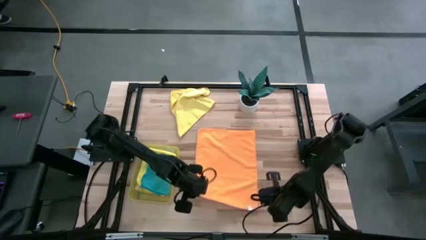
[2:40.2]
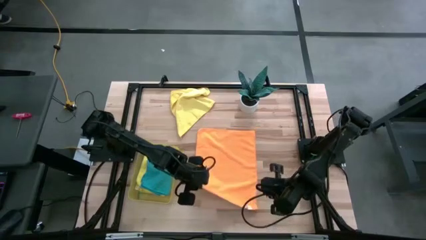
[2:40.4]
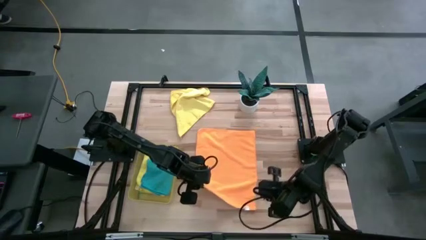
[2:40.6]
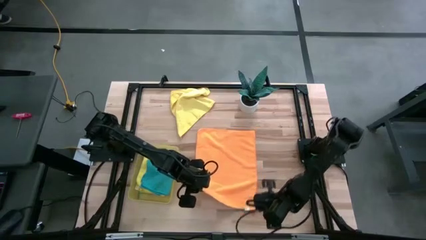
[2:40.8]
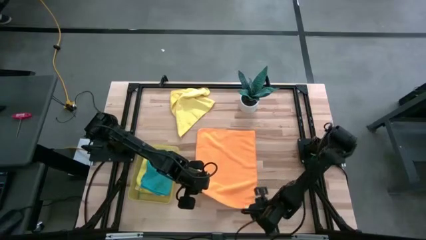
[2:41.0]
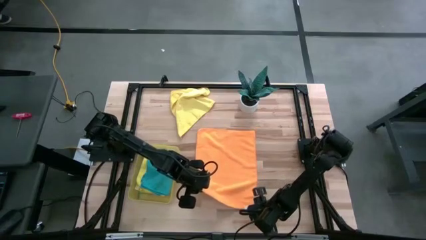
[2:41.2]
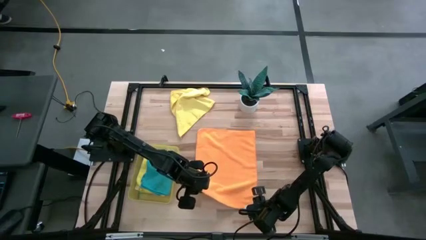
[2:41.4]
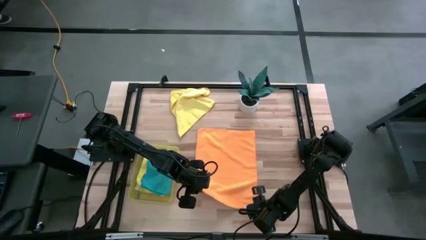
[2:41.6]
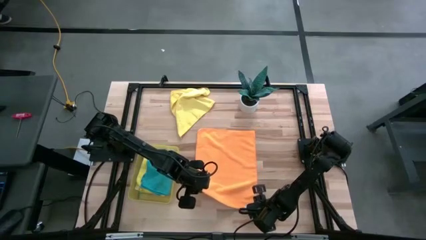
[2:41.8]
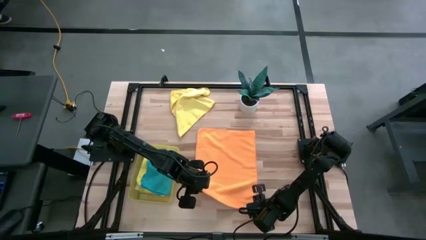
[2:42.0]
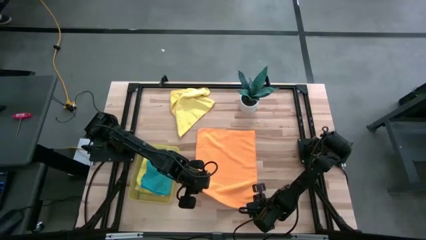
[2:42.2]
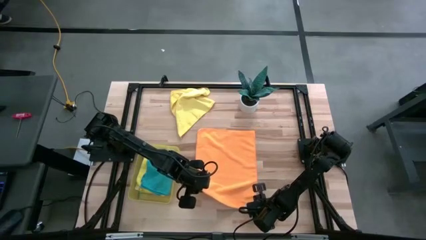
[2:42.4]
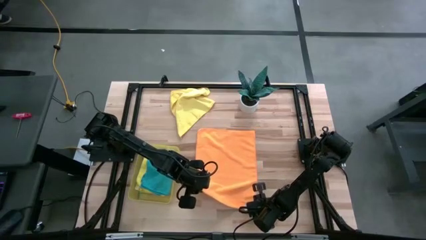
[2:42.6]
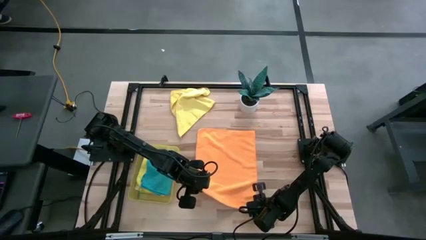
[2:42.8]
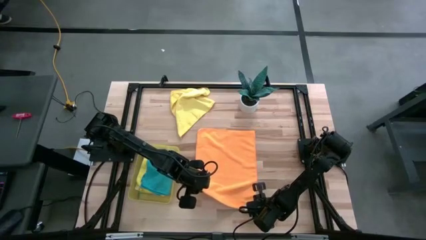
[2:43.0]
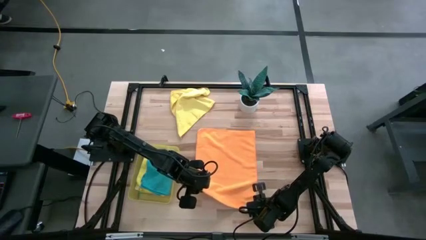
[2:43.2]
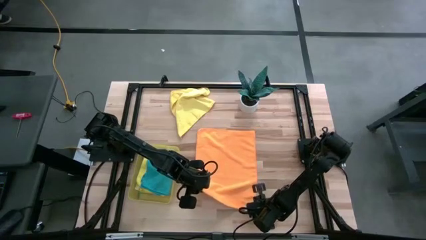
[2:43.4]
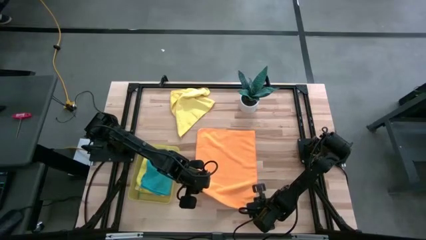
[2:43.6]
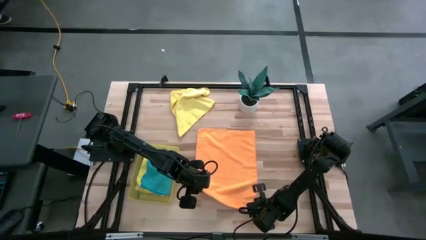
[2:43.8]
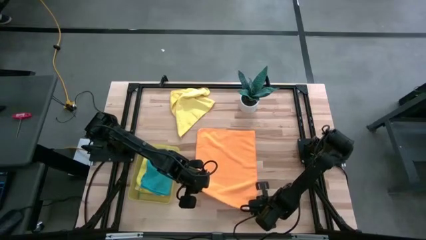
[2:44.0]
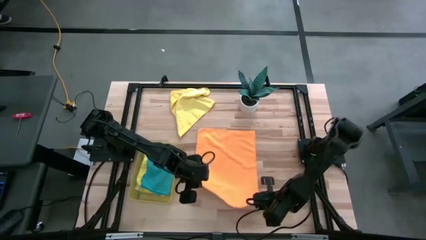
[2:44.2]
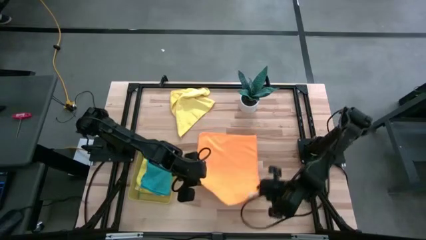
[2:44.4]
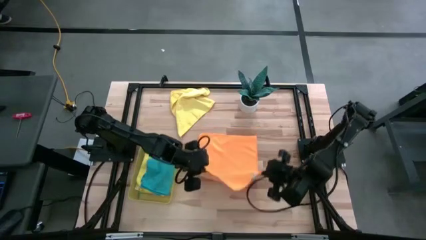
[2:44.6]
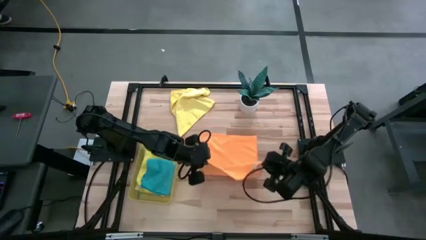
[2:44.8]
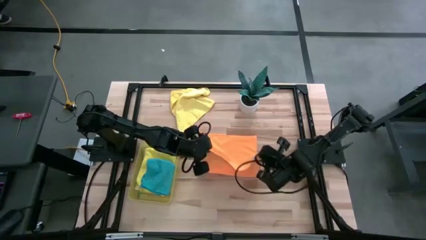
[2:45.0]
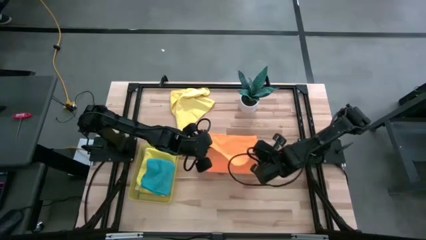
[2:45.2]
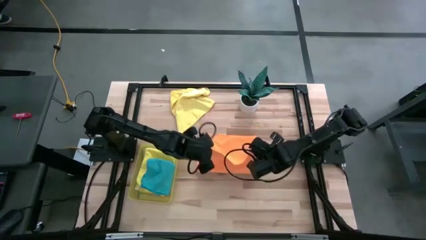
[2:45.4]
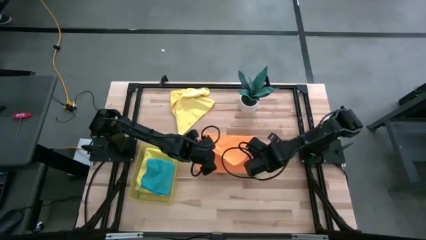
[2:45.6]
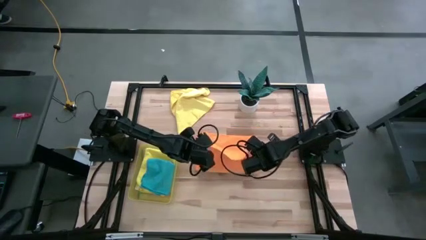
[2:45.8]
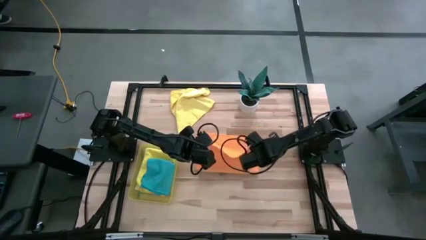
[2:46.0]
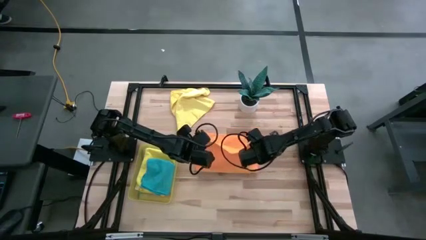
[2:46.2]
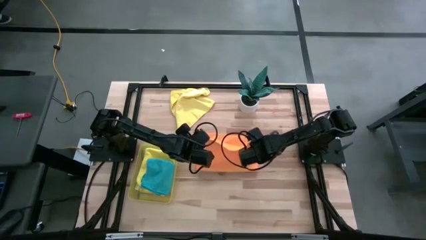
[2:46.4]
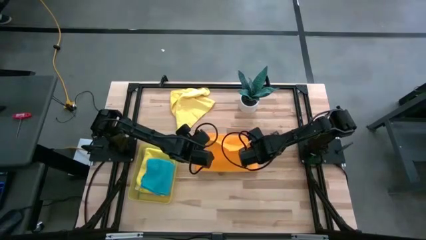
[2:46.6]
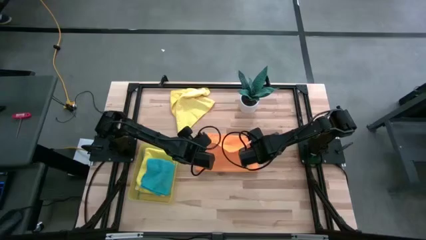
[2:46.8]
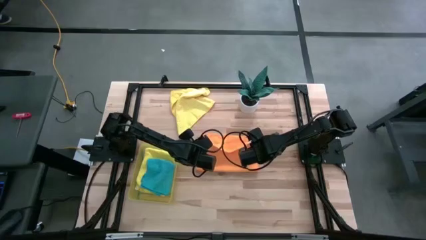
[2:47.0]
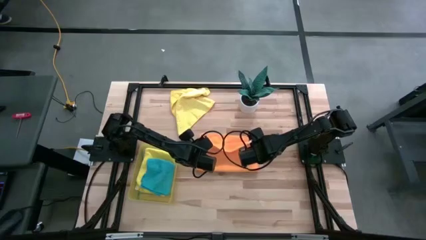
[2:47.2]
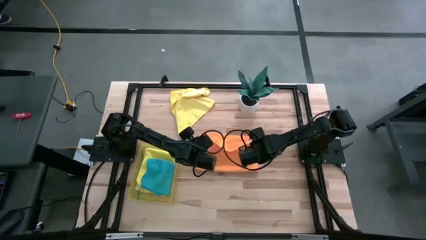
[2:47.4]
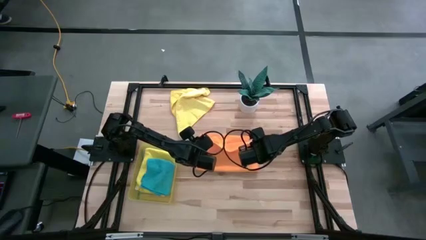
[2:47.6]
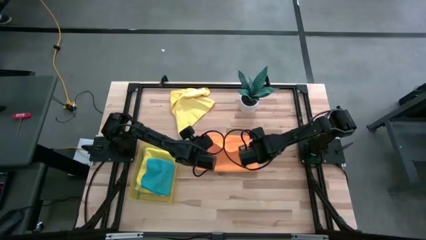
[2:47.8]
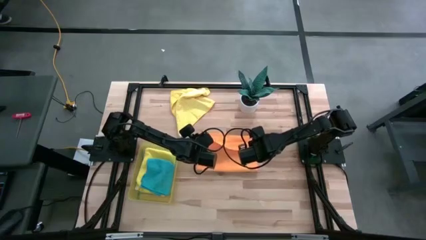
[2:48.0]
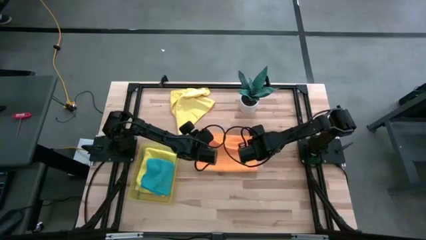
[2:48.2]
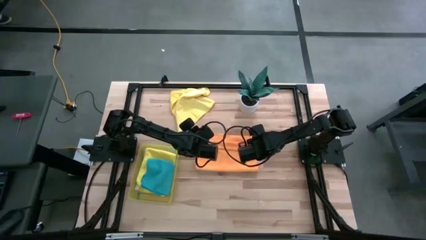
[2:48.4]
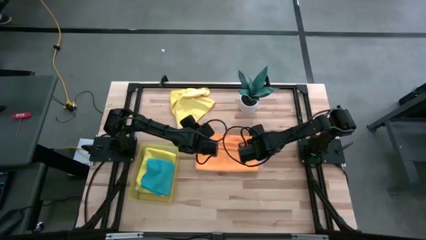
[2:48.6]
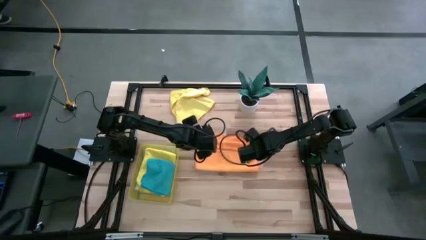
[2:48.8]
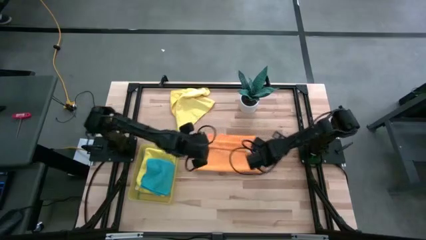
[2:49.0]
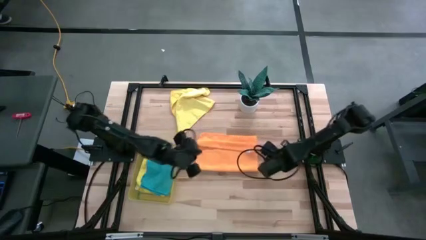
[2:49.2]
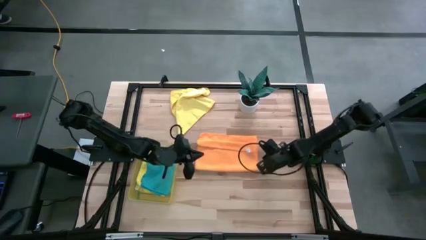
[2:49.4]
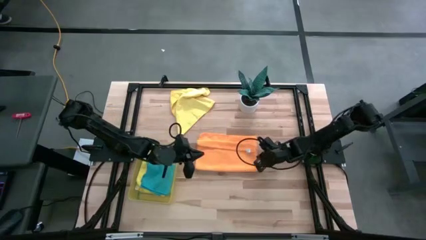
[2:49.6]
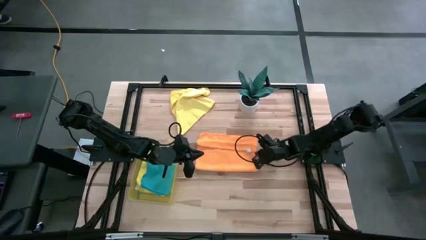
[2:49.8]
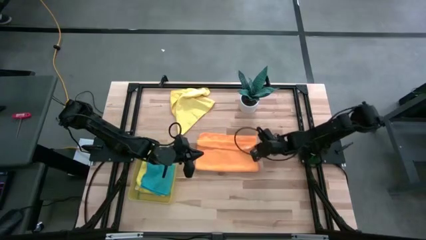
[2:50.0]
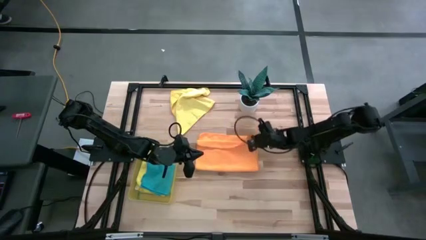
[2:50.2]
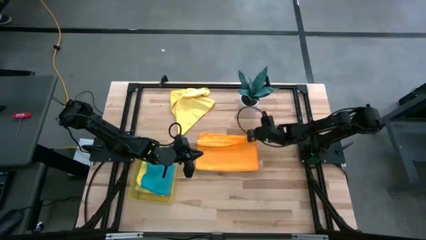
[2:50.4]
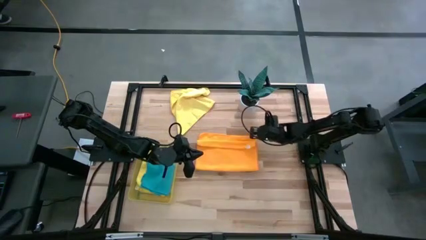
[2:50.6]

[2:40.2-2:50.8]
Task: Fold microfiber towels
Fold the orange microfiber cloth
